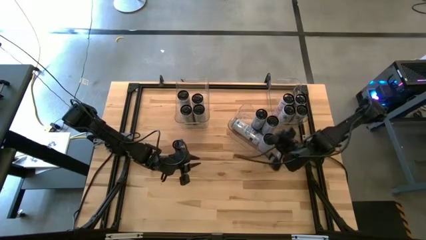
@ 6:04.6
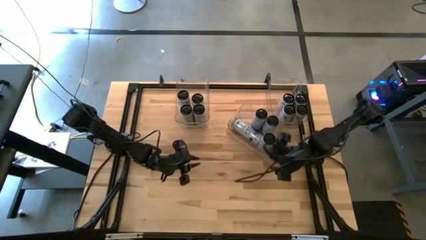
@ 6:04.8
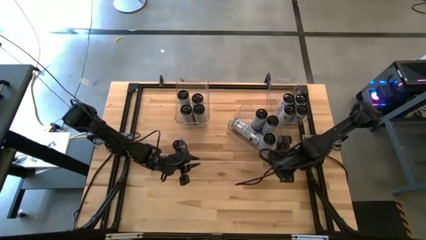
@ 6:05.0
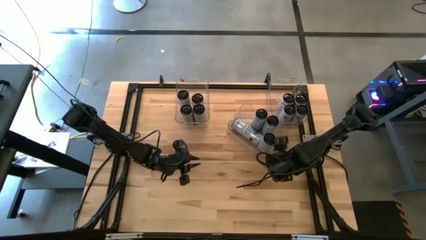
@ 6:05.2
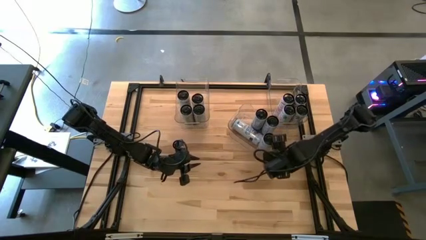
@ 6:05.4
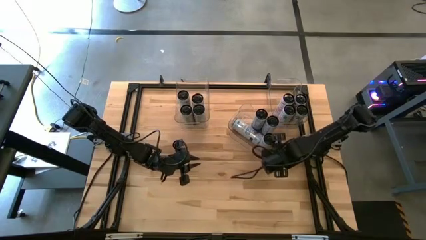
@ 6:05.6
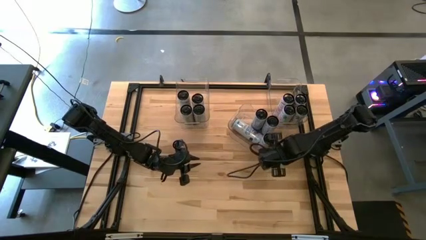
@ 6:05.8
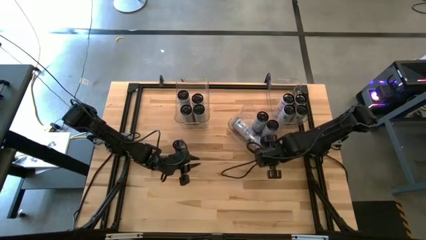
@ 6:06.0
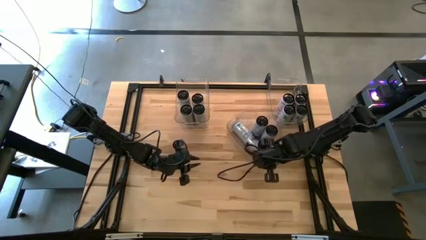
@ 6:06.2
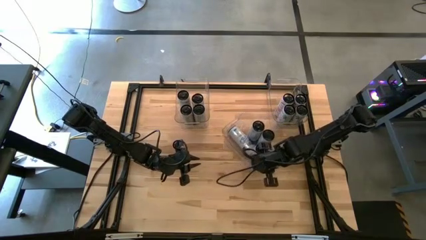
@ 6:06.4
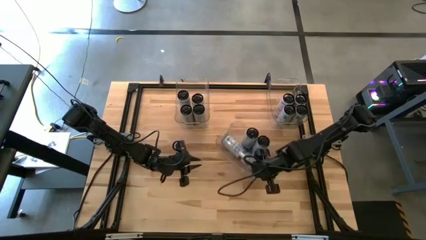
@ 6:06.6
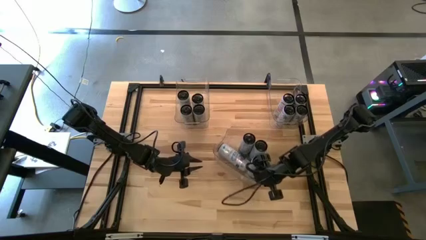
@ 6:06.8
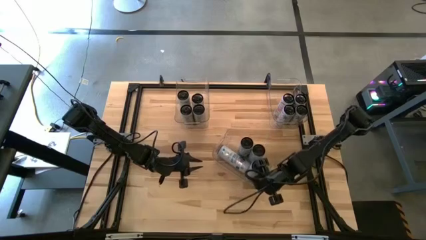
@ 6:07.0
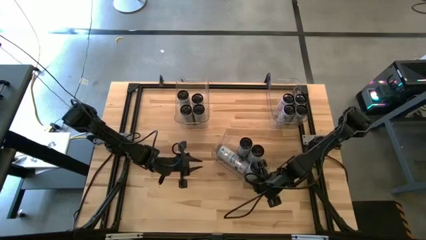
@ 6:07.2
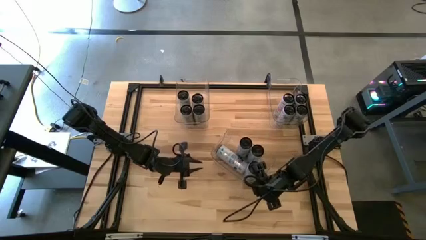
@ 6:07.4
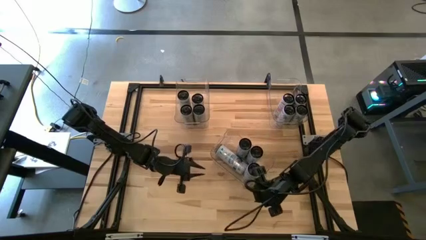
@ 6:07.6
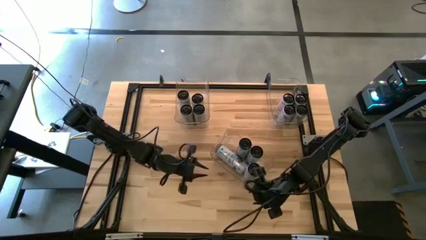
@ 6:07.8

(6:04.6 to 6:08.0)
Task: Sort soda cans
Move the transparent bin to the center of the table

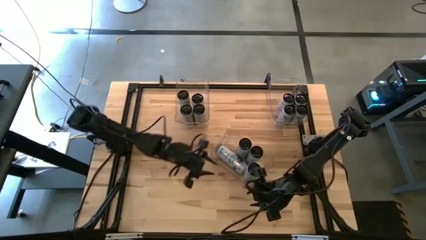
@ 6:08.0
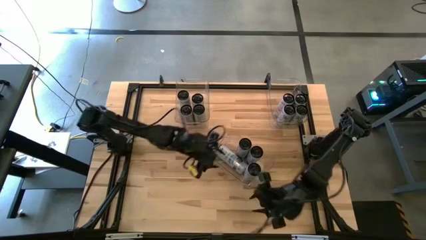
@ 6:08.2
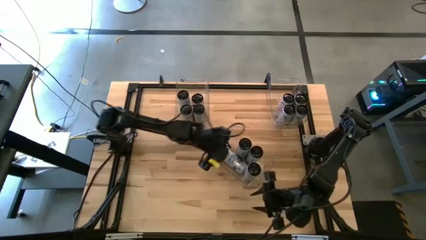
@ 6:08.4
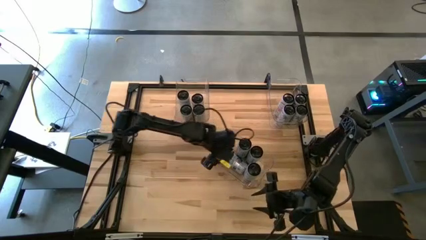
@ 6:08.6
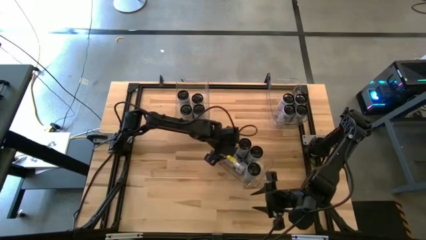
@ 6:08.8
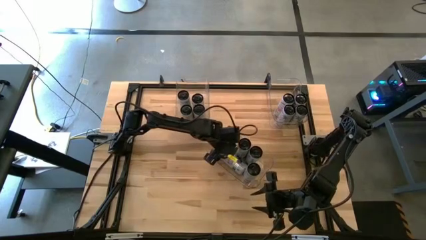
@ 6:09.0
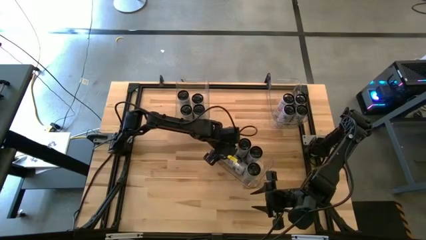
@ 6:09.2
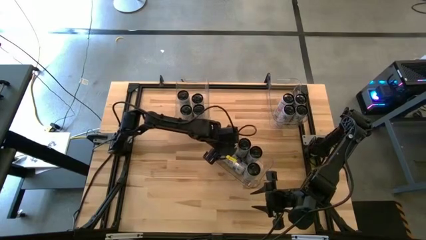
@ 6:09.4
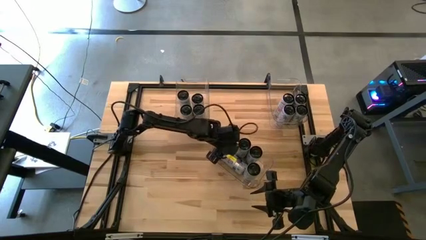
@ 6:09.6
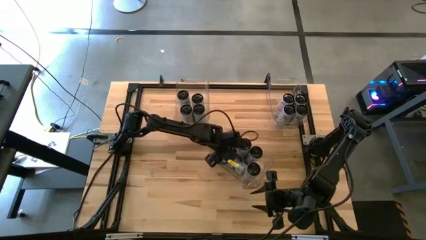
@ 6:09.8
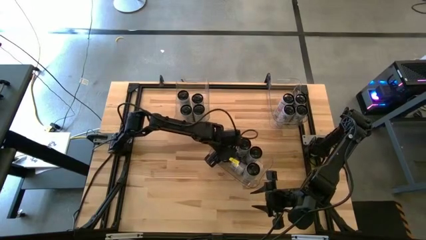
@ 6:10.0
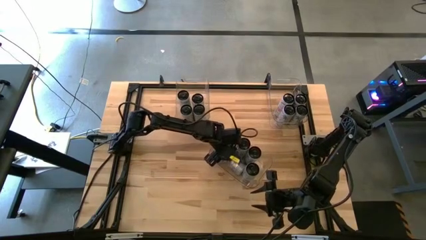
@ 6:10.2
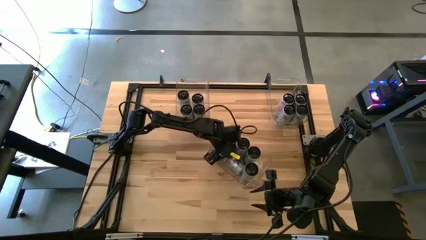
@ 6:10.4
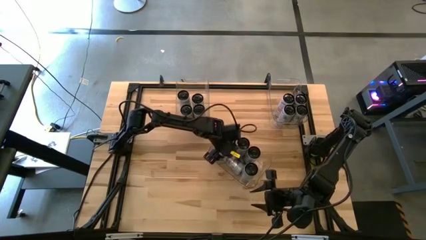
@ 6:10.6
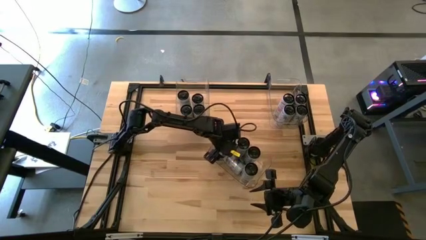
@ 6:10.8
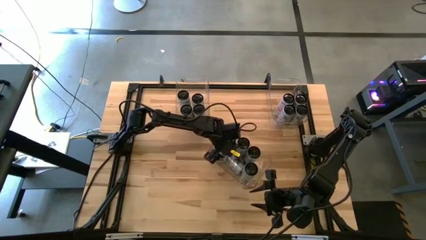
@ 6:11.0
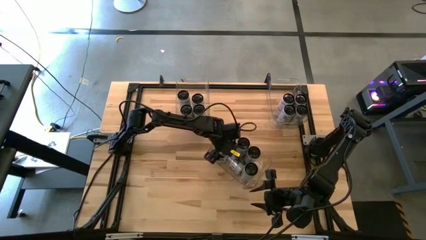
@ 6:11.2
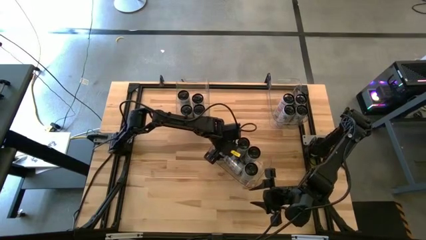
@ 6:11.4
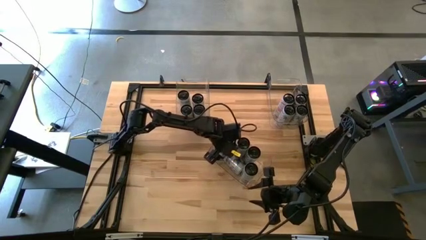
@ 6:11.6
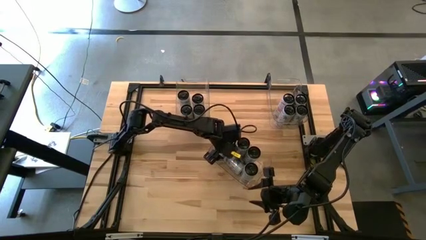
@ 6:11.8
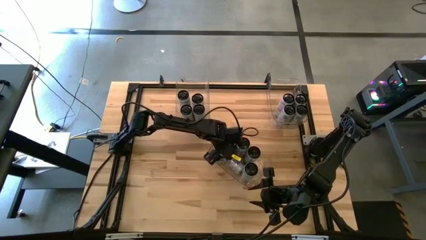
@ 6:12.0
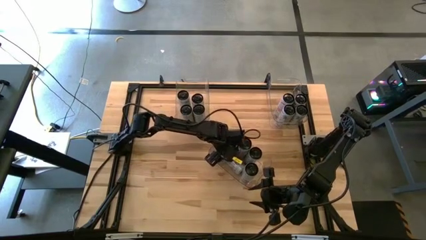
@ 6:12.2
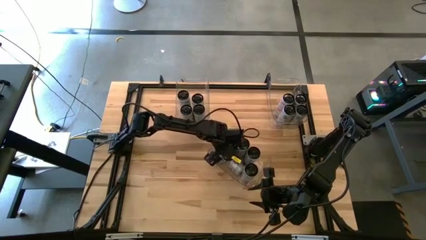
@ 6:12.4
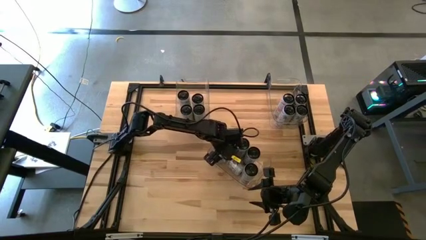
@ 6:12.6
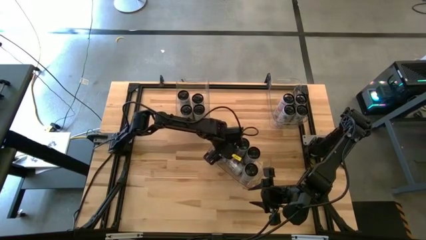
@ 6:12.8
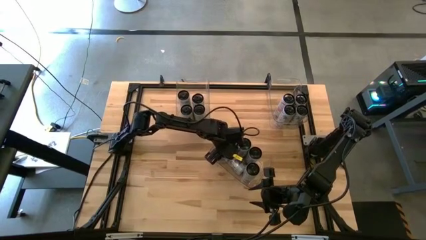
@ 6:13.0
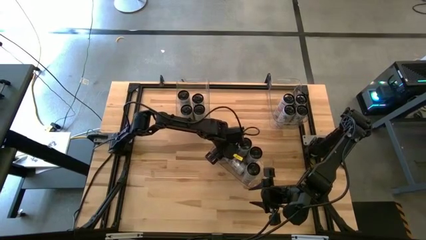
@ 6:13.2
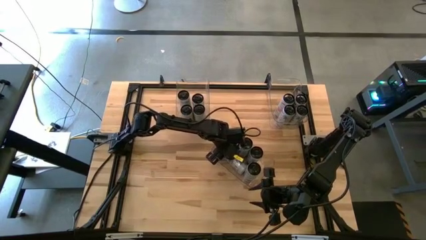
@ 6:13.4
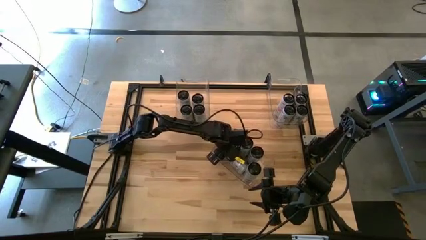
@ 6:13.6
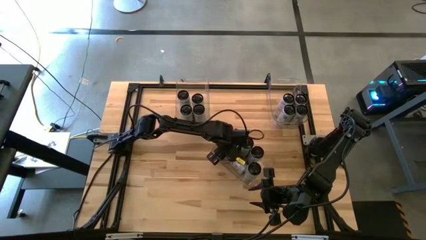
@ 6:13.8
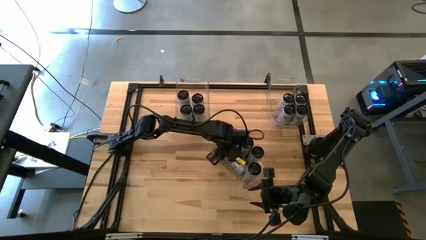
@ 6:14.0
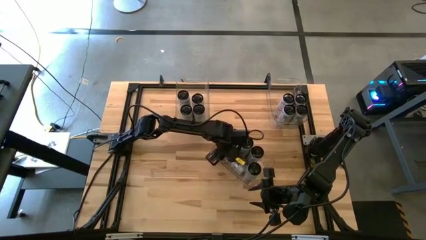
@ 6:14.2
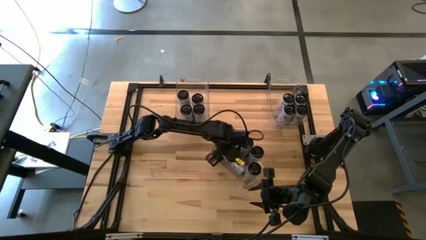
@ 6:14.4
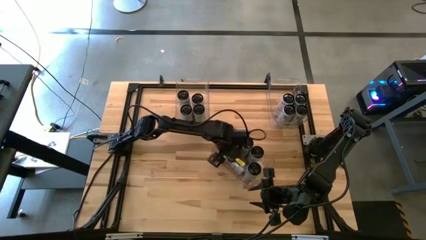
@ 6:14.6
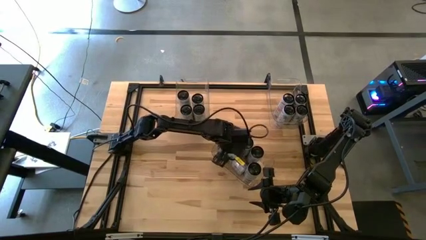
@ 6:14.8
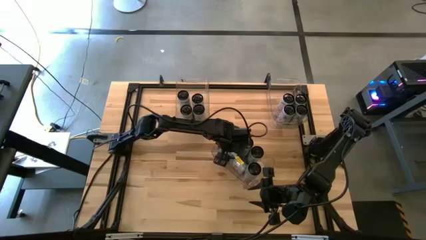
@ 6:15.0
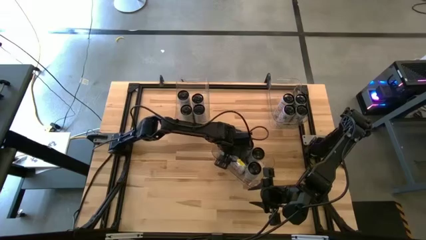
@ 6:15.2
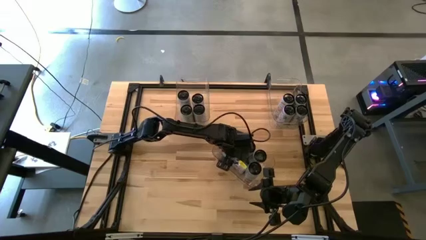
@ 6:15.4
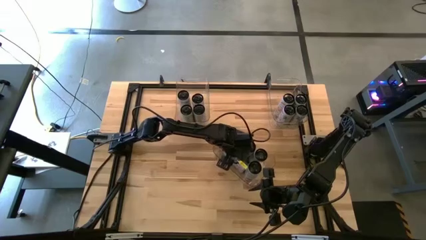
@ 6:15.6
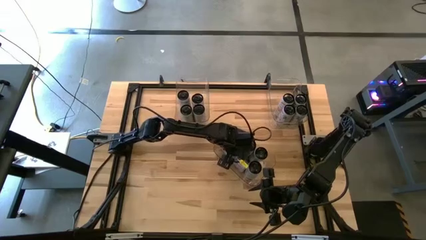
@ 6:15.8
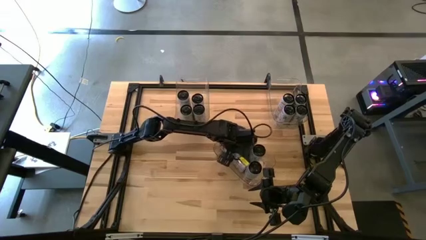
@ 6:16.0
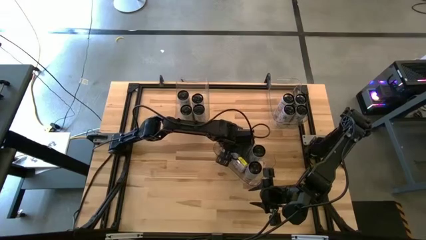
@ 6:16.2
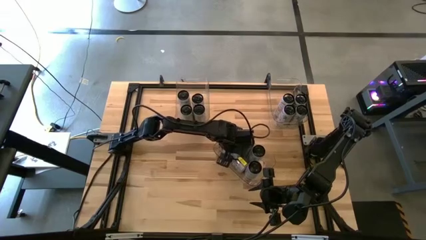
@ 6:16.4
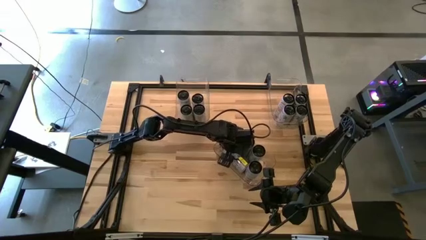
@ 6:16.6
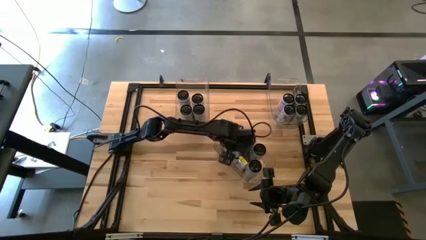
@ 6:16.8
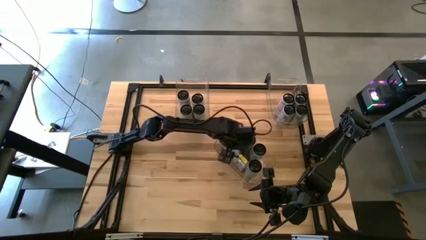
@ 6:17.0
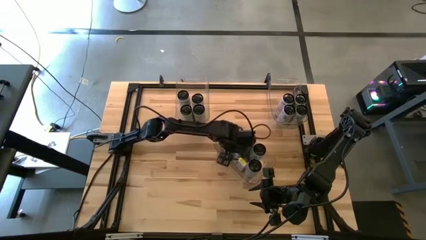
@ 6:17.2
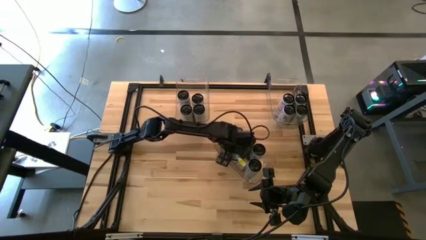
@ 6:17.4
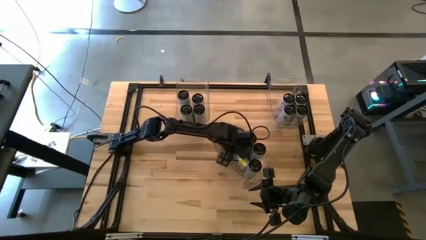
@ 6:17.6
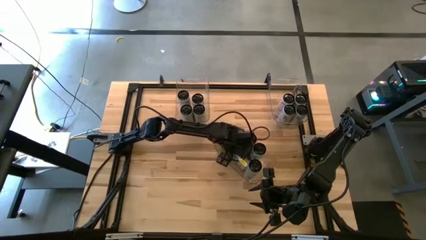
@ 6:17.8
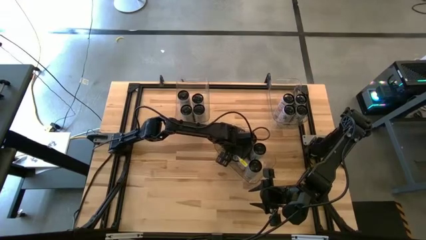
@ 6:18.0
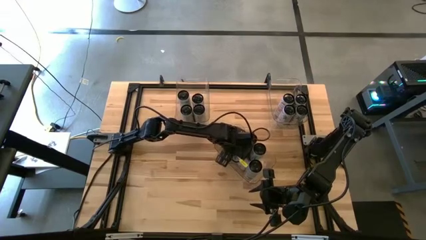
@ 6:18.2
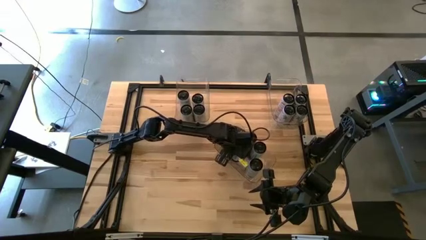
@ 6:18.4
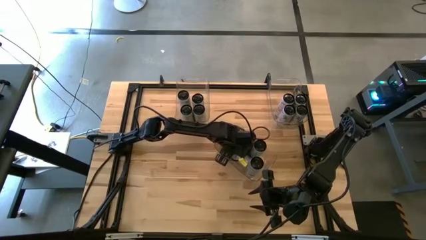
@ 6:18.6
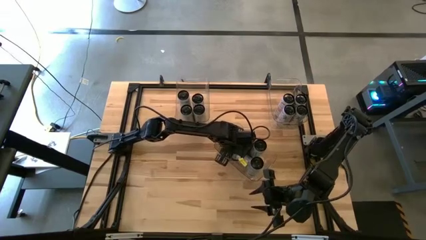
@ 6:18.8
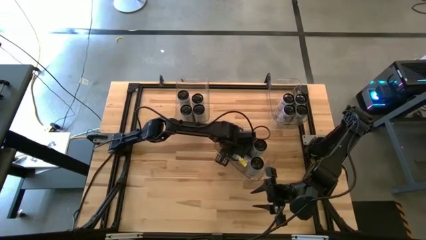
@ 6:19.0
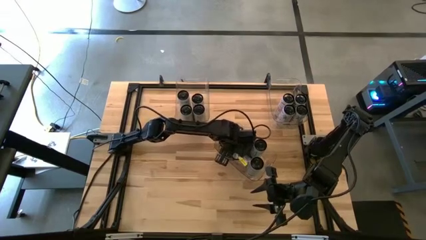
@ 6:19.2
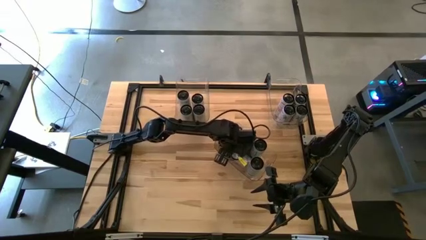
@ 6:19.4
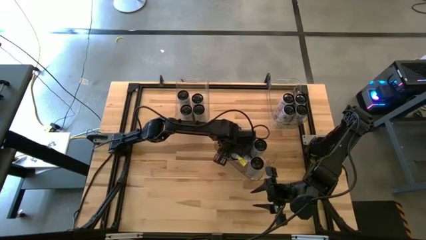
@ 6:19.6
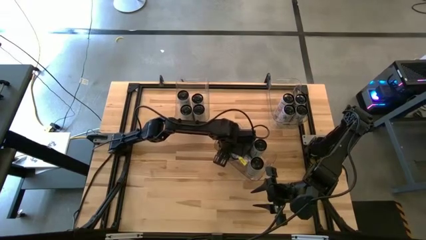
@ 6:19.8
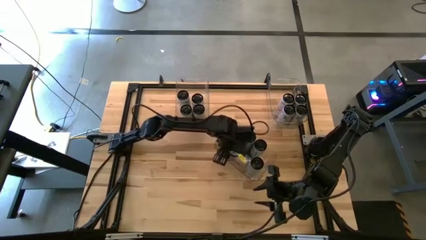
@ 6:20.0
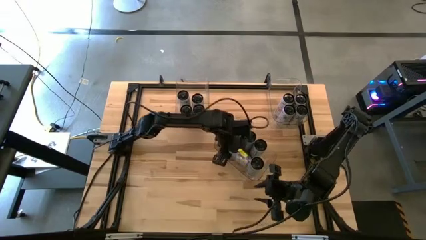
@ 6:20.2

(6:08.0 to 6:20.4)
Adjust the white/blue soda can
